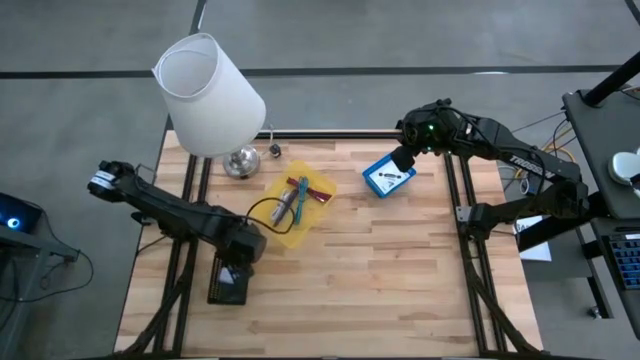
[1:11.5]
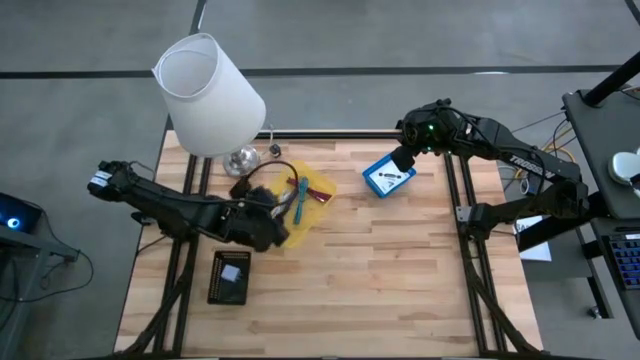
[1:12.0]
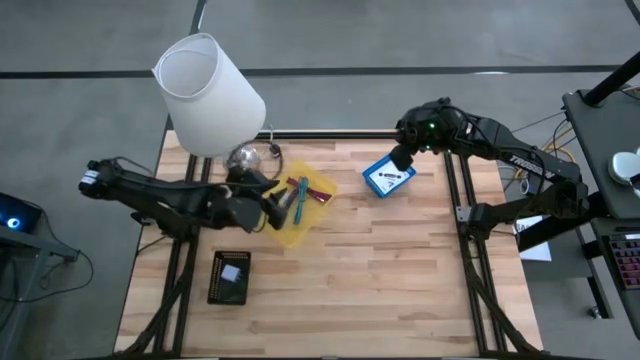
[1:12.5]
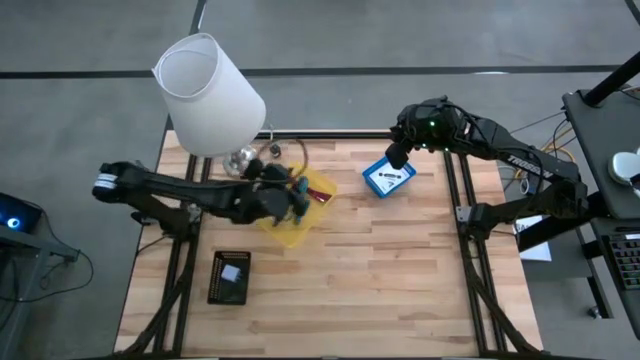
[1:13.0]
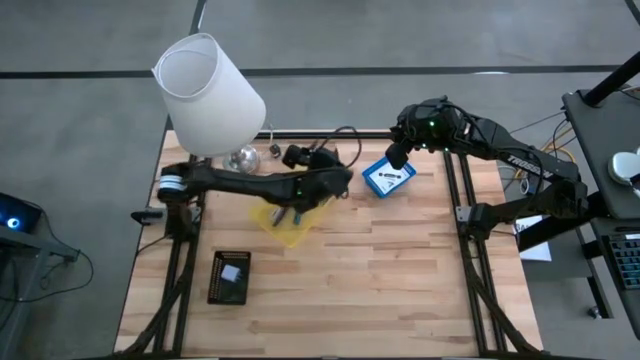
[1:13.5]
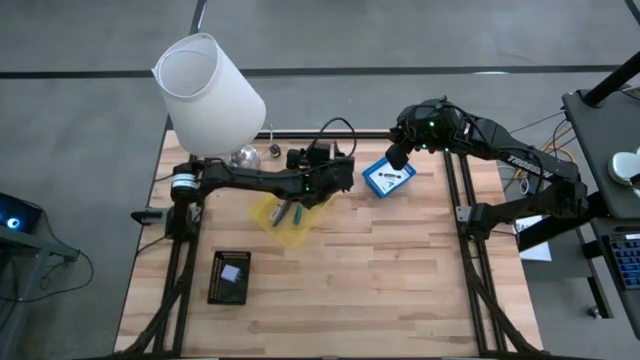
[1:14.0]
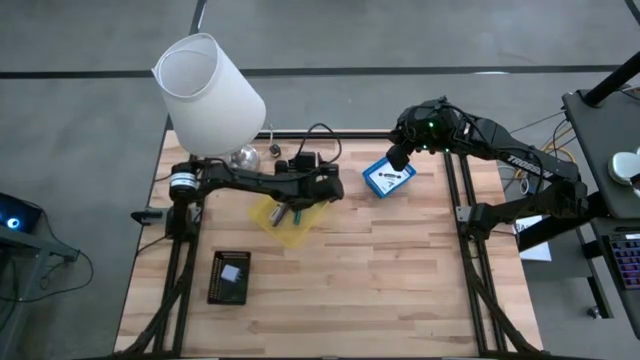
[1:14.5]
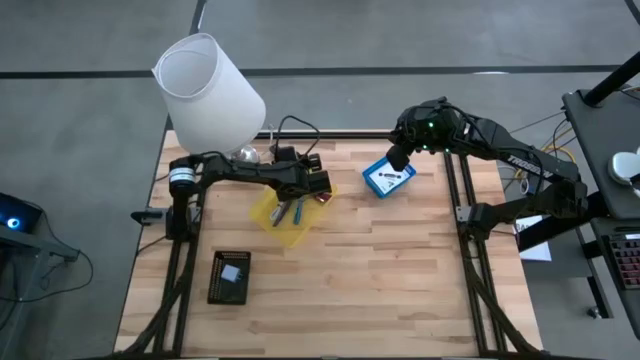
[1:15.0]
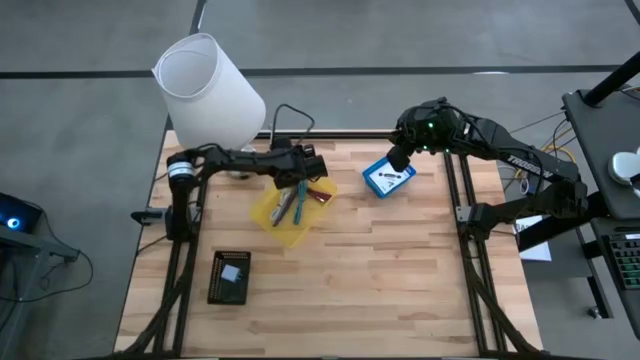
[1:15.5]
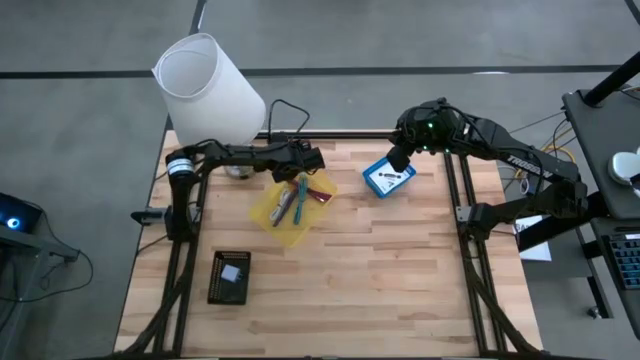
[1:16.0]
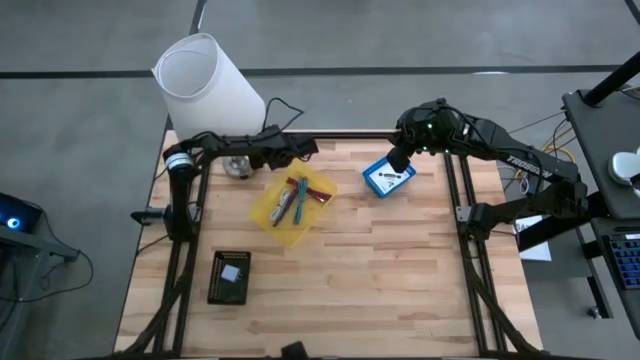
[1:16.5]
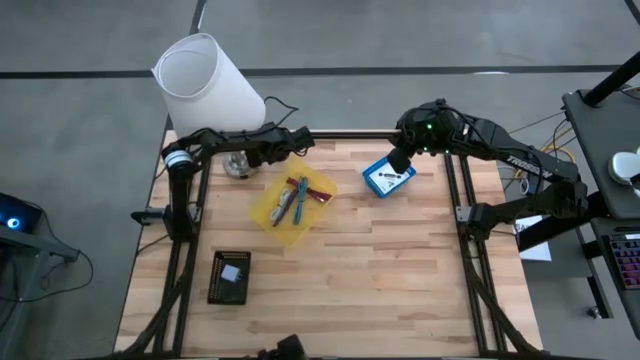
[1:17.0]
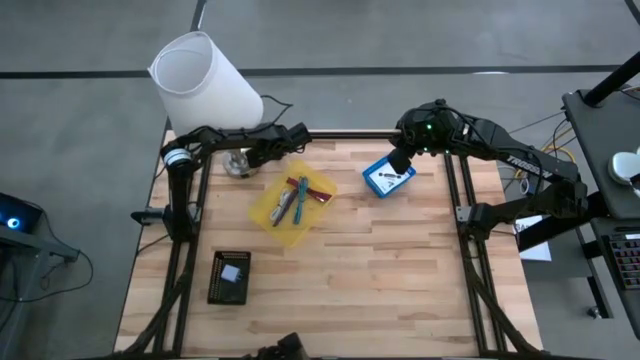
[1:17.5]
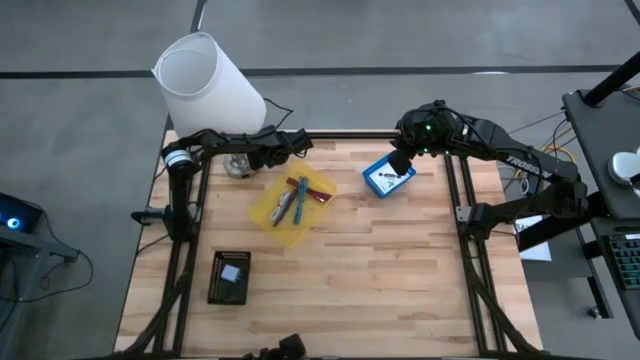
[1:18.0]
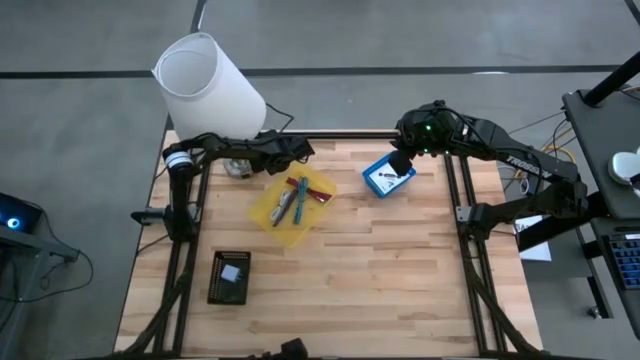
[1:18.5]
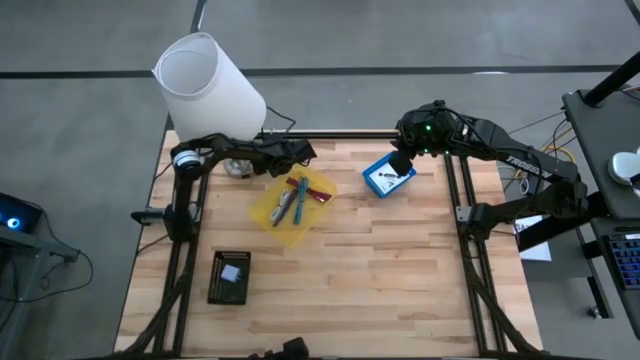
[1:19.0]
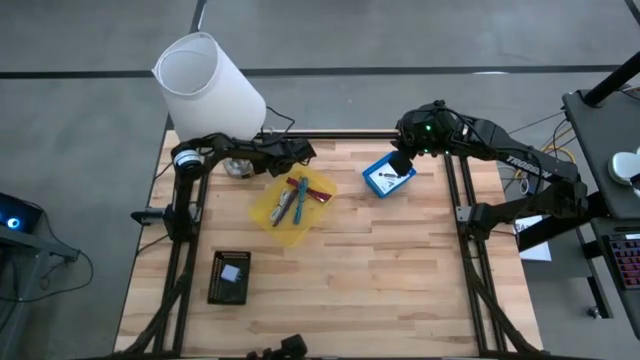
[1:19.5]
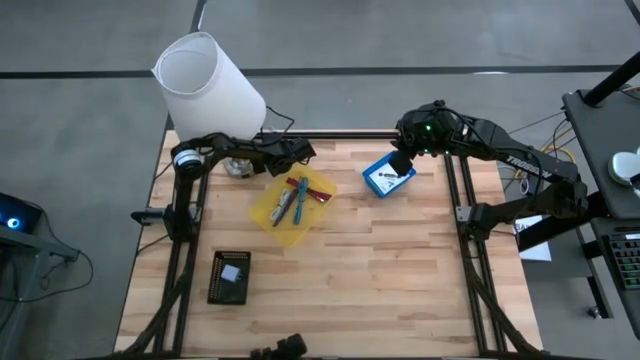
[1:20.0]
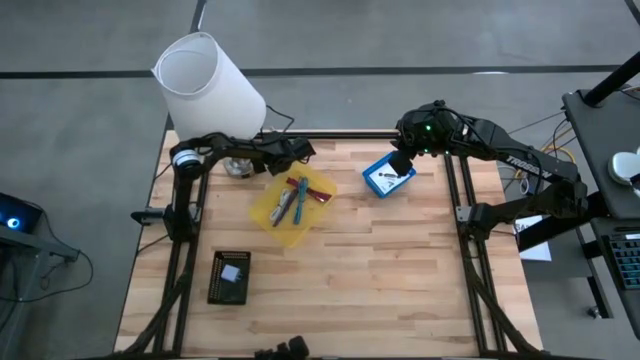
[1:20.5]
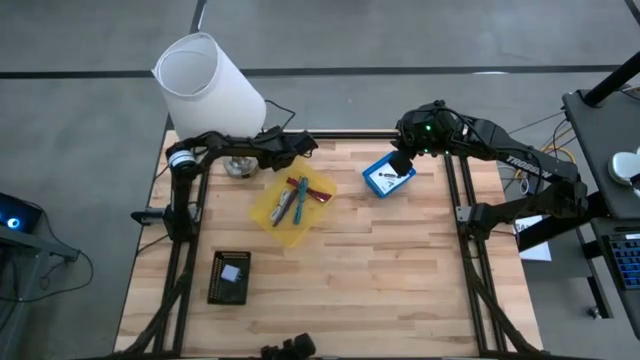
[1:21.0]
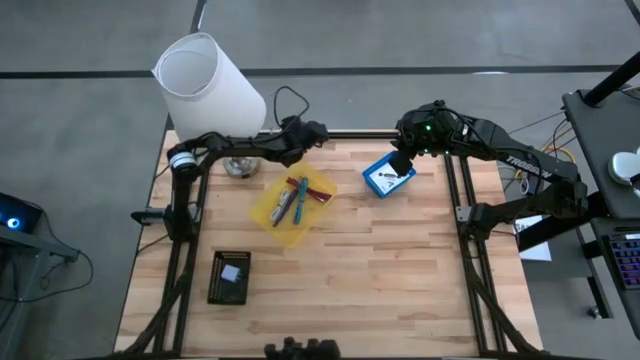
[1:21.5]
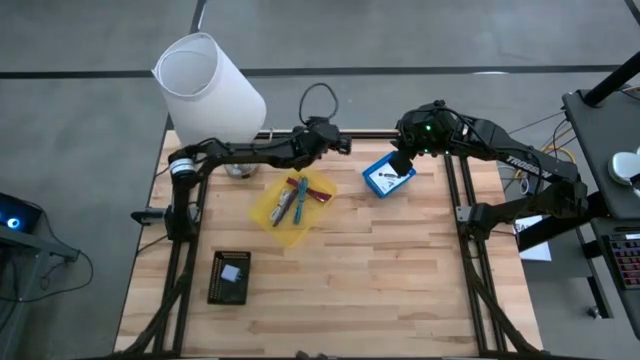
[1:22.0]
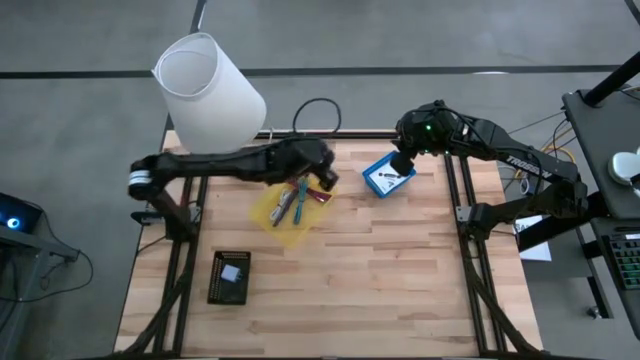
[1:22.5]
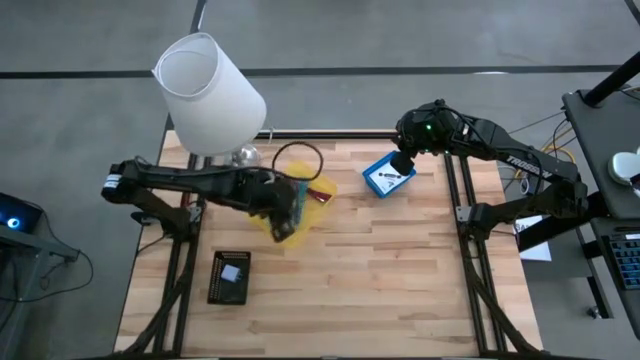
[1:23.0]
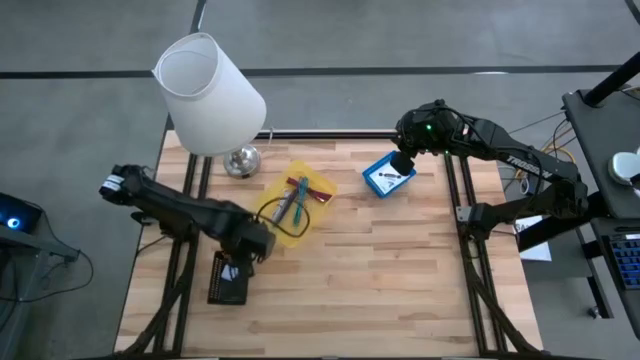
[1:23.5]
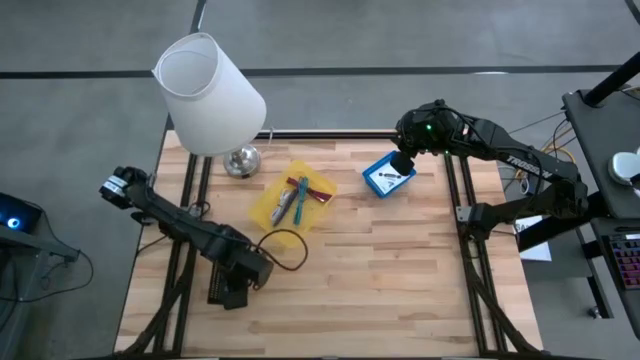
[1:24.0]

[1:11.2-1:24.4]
Task: Pick and place items into bin
Put the black charger adapter into the black bin

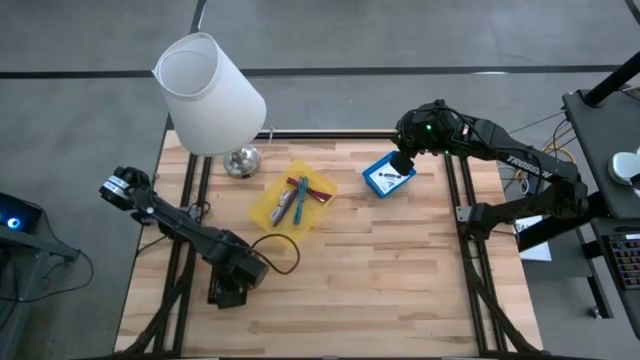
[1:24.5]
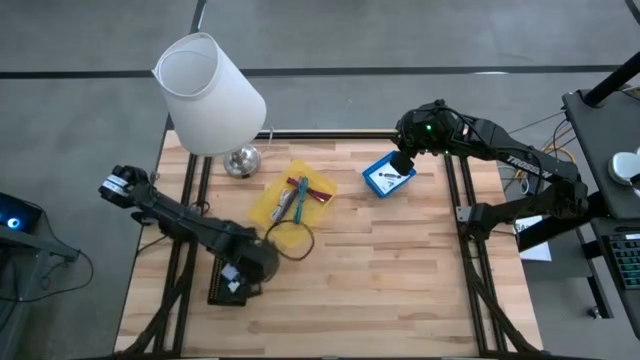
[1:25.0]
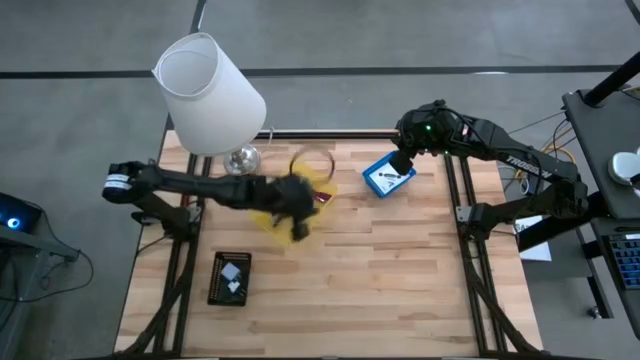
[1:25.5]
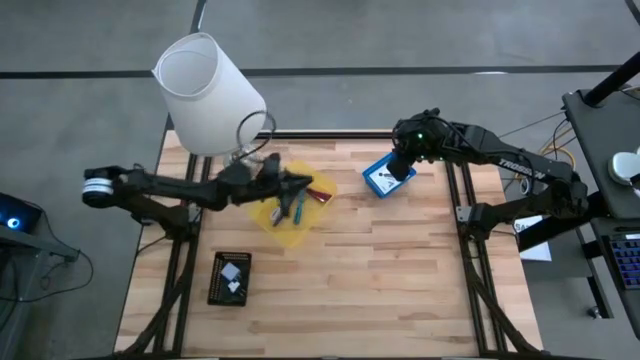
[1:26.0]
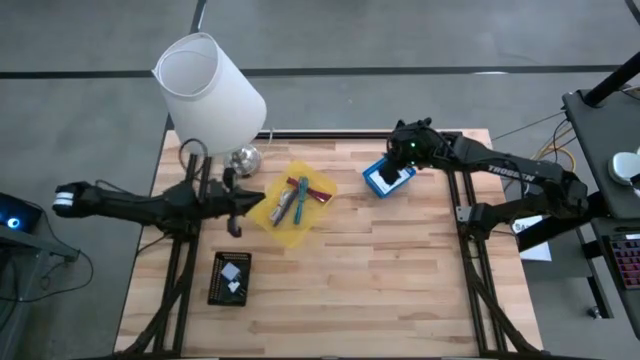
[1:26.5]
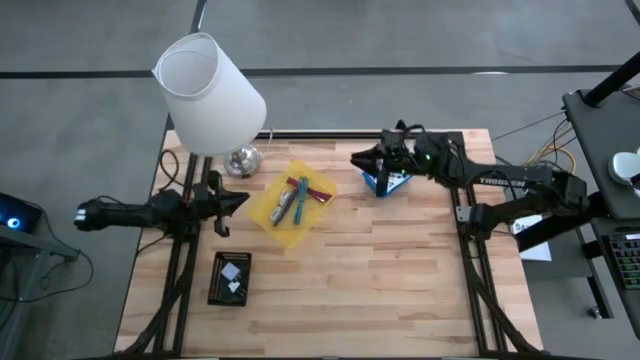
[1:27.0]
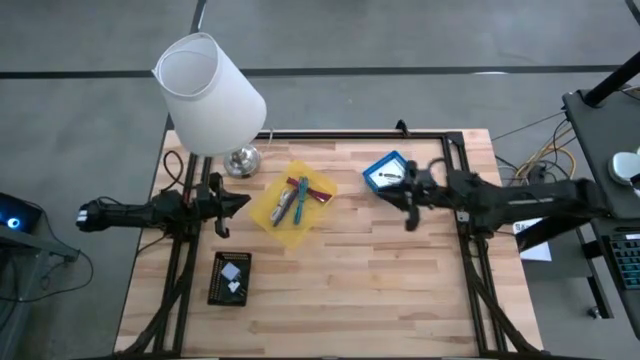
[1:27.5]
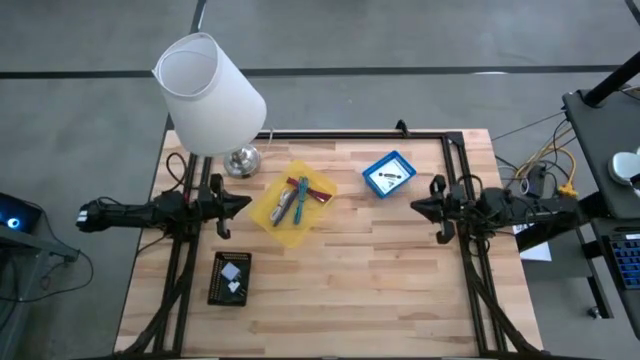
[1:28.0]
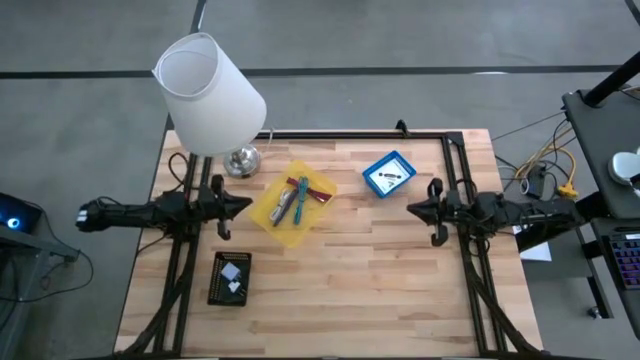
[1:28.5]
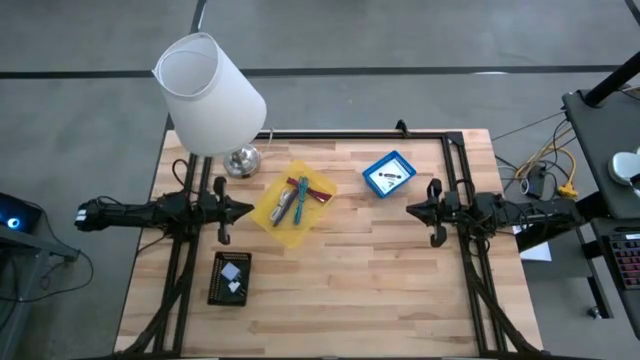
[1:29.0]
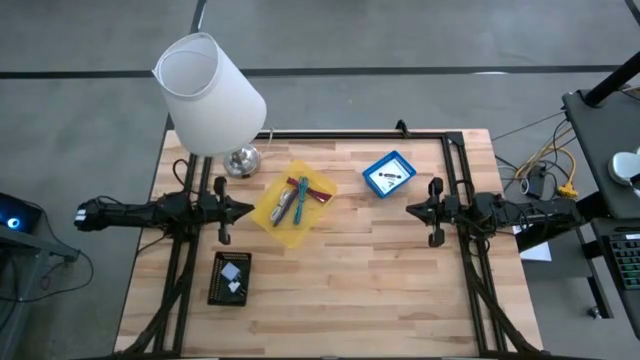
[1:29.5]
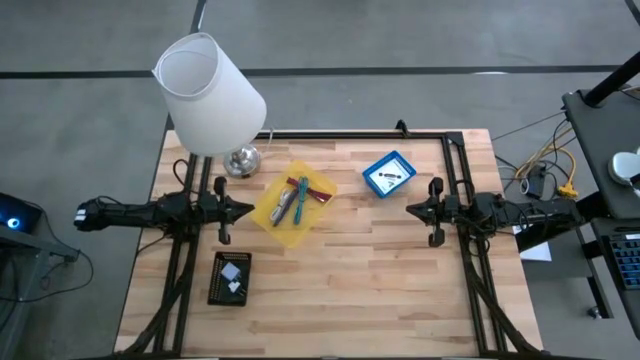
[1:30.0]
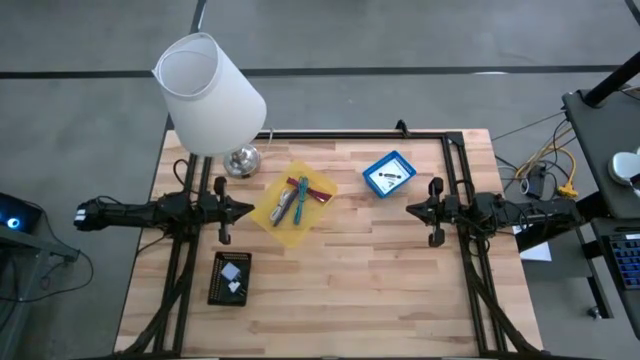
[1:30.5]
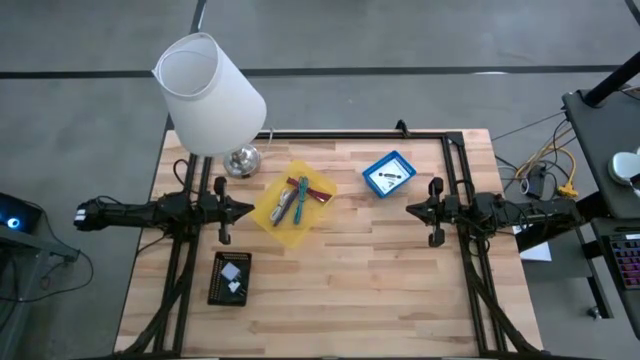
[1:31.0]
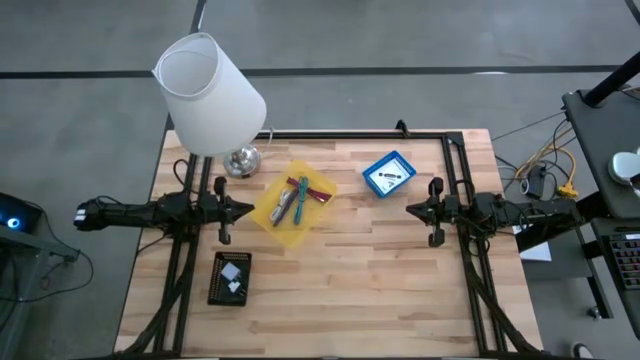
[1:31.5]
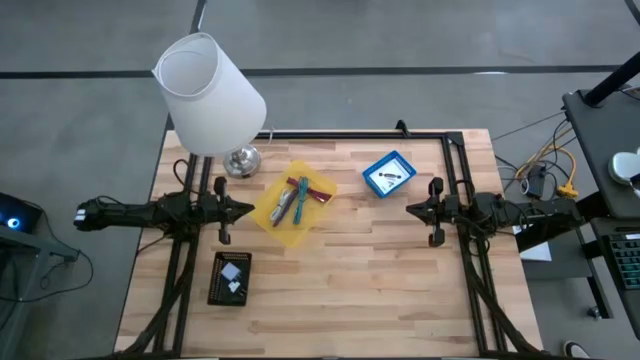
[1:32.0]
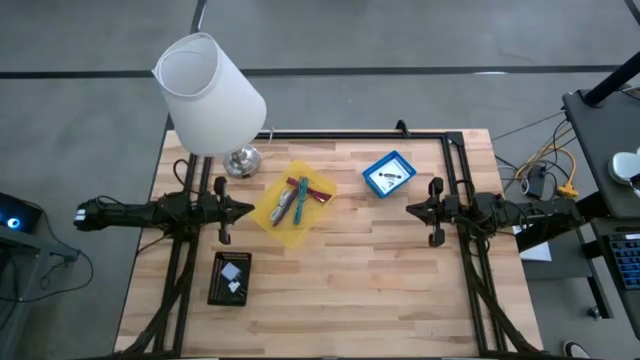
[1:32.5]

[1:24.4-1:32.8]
Return to Home Position
